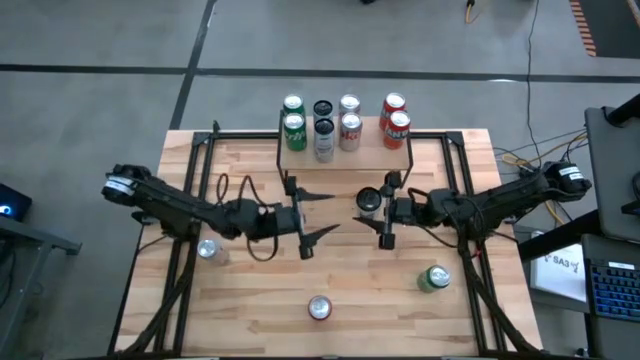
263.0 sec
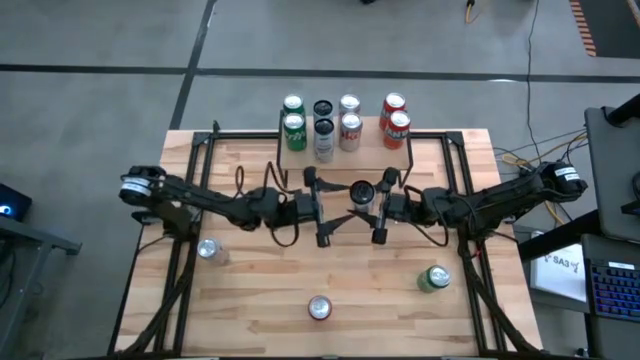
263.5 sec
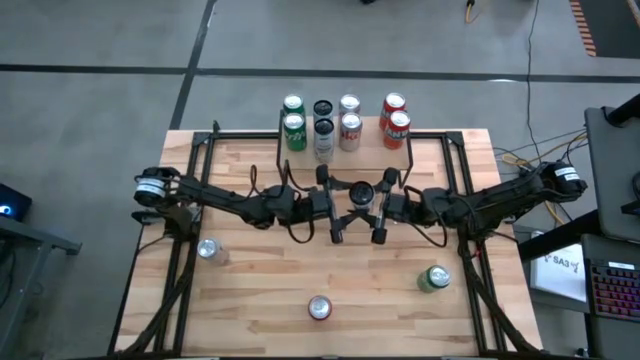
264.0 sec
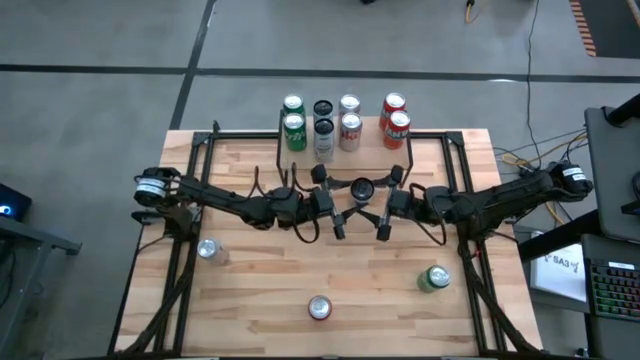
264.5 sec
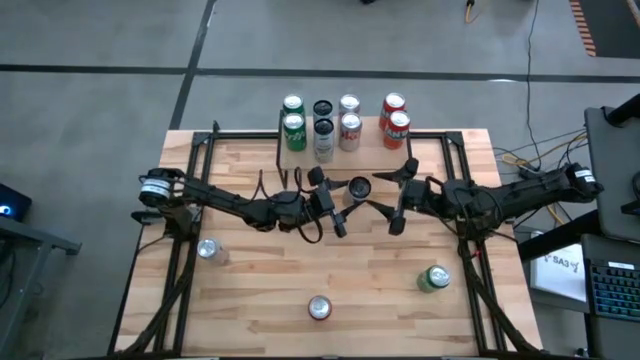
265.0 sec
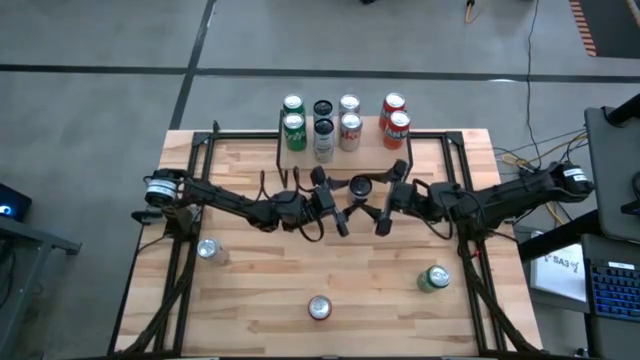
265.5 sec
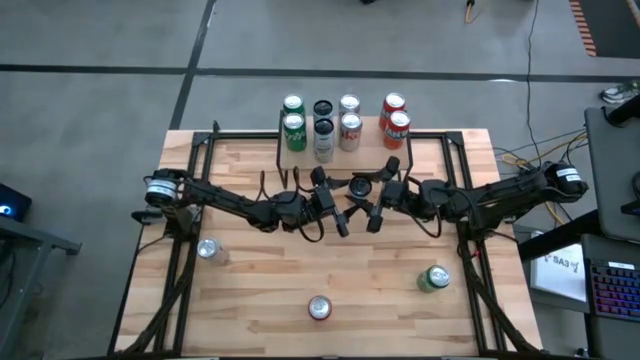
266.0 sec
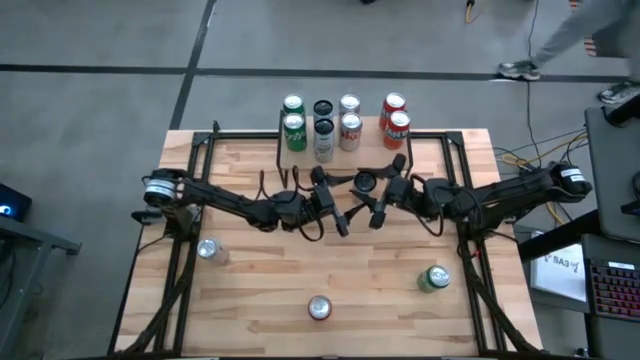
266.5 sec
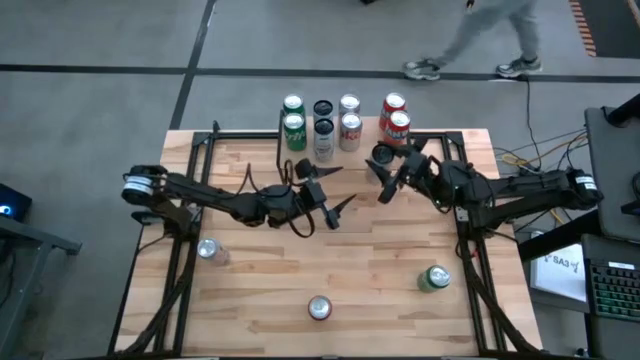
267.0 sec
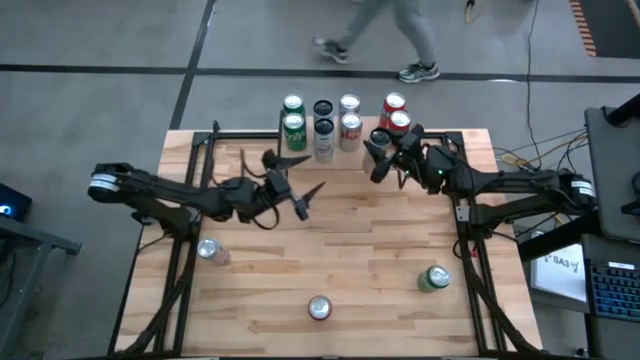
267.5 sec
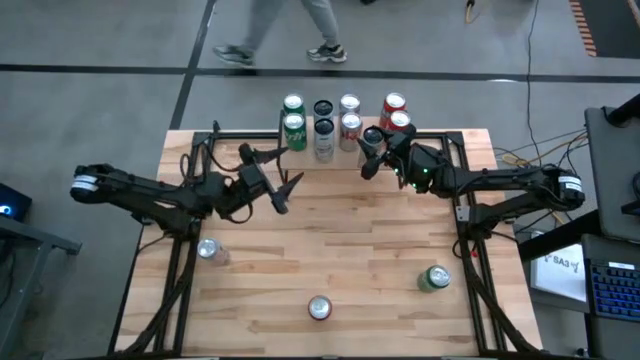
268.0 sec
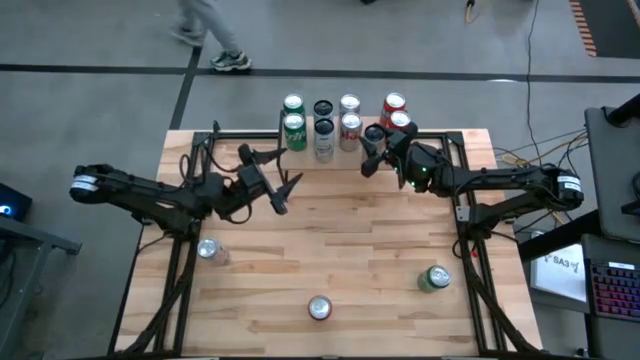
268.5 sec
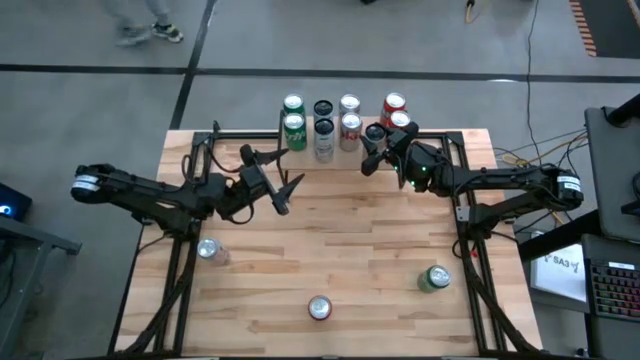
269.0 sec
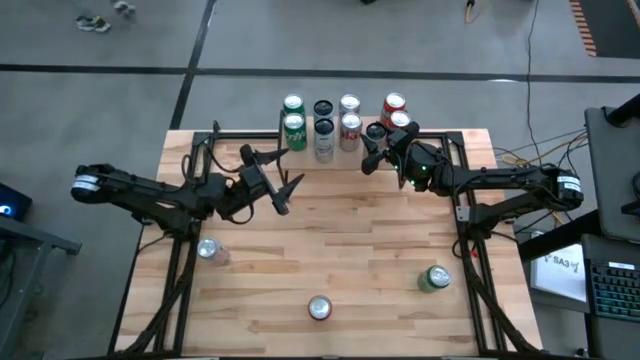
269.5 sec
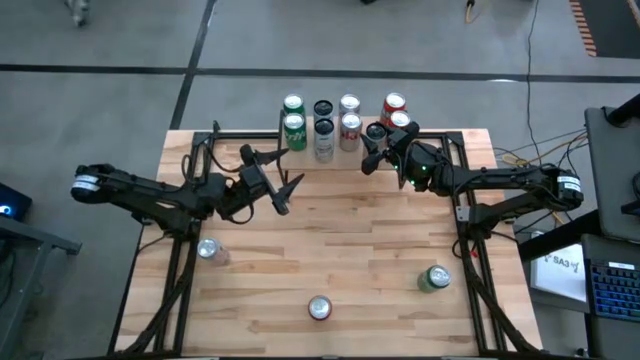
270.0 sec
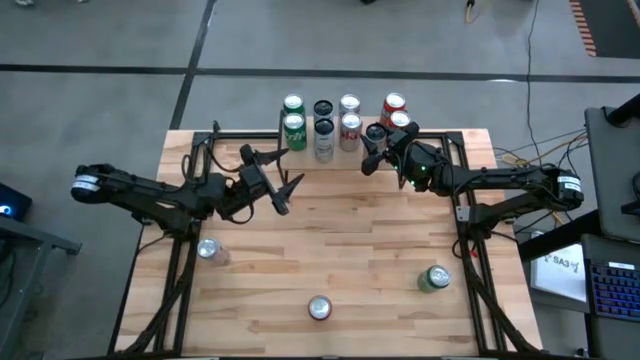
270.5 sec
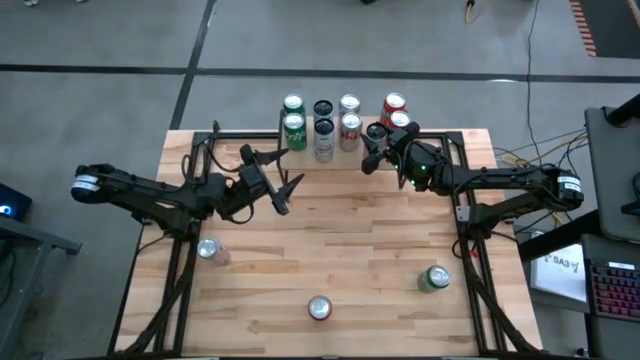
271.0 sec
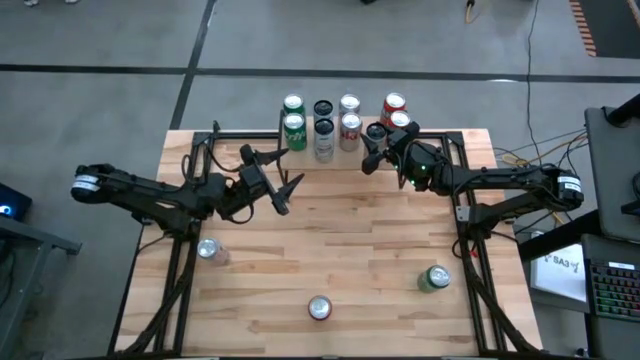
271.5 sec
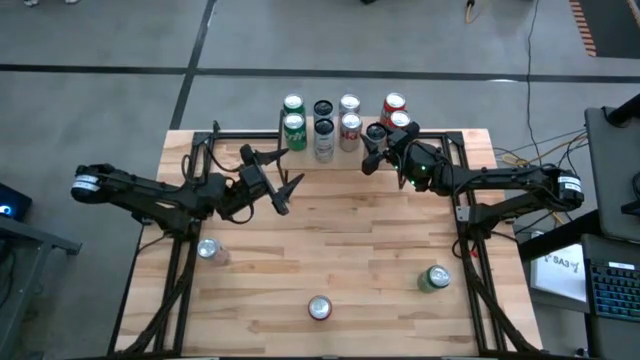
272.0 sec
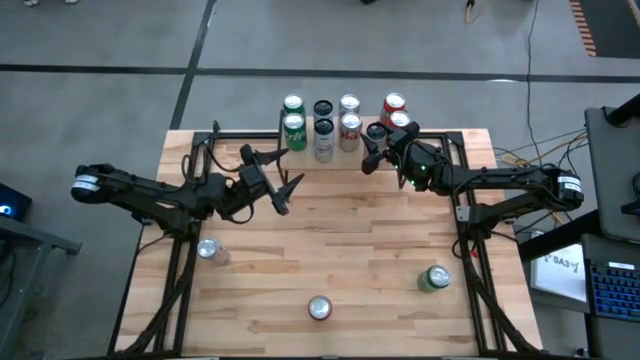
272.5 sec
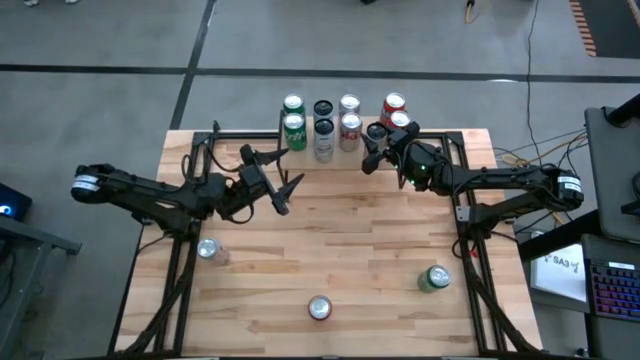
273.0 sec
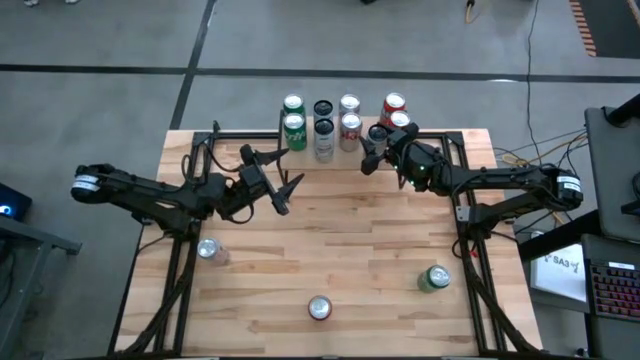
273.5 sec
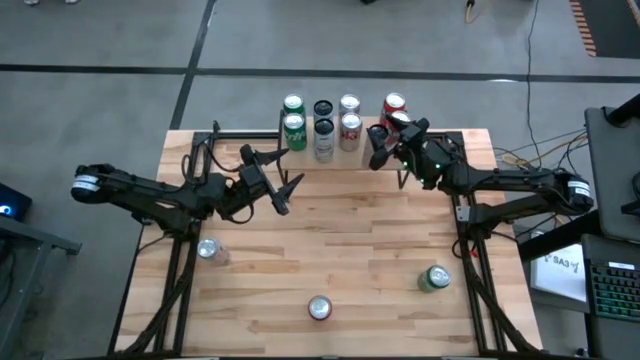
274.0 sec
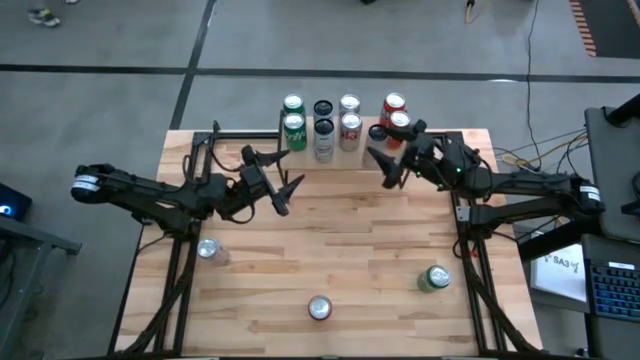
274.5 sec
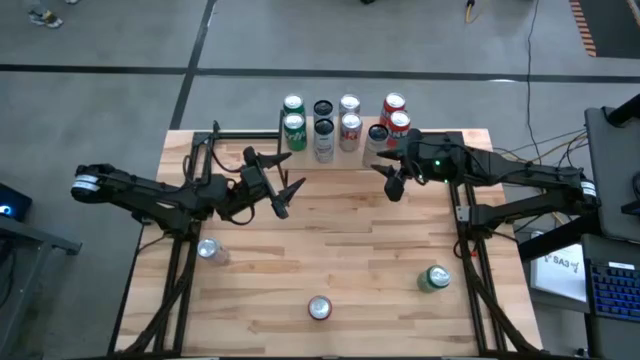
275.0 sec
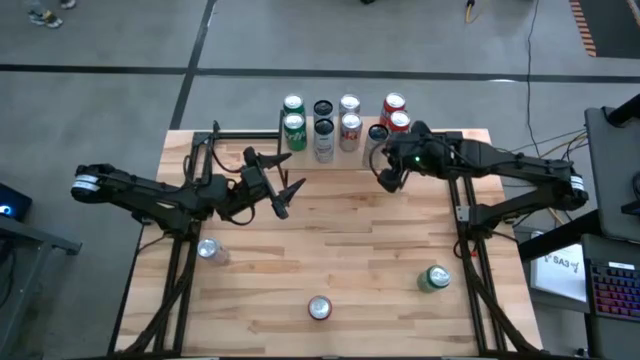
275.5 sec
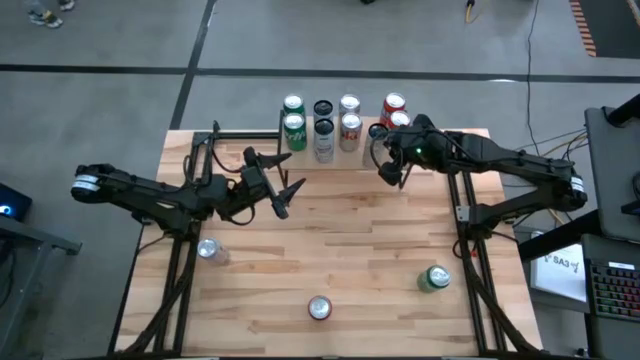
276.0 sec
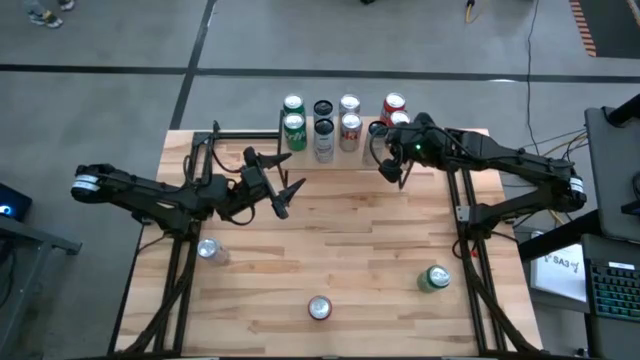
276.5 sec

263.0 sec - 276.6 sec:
Task: Place canned beverage on shelf
Put the white yellow soda can on the shelf
